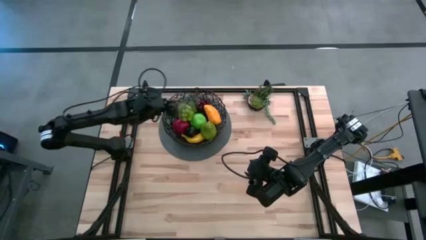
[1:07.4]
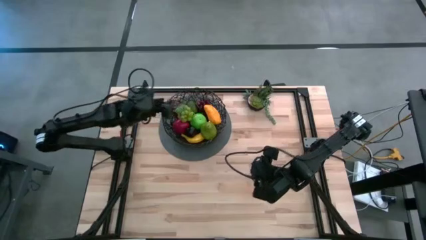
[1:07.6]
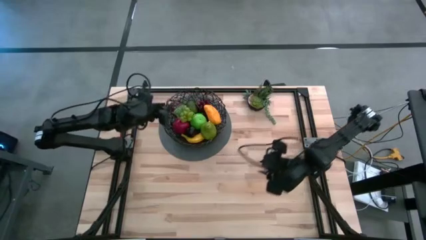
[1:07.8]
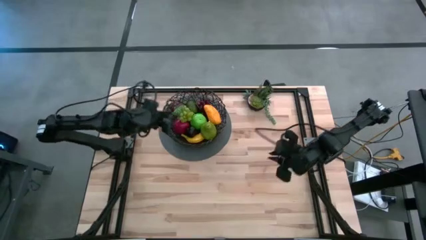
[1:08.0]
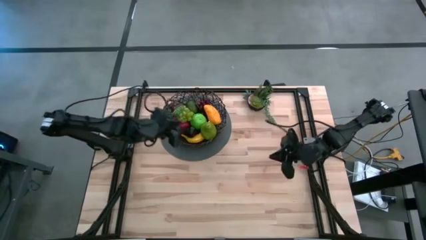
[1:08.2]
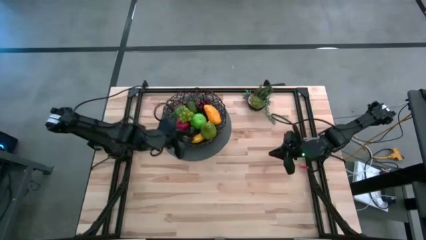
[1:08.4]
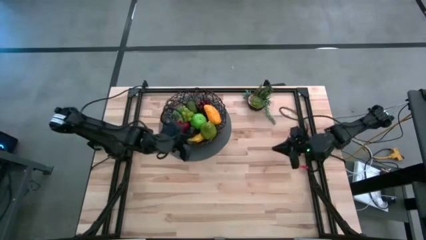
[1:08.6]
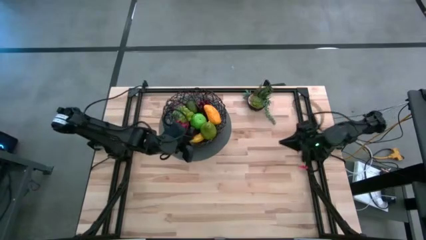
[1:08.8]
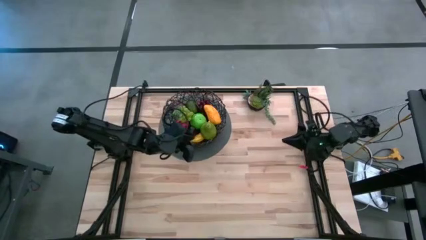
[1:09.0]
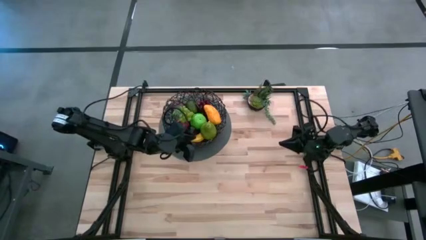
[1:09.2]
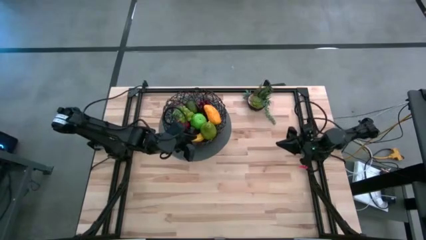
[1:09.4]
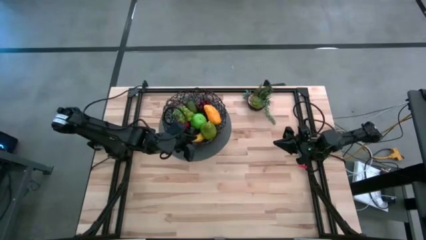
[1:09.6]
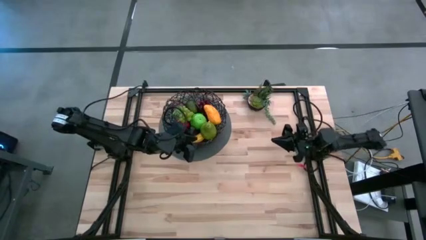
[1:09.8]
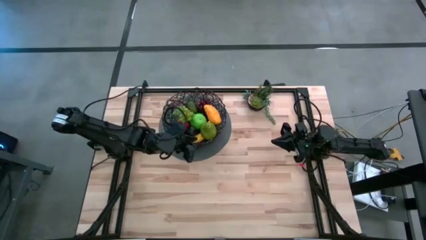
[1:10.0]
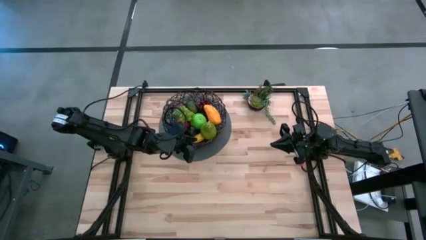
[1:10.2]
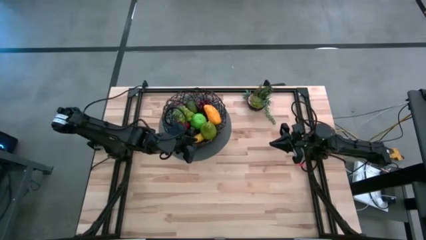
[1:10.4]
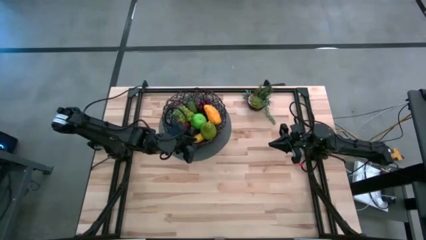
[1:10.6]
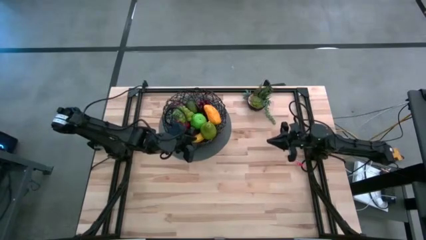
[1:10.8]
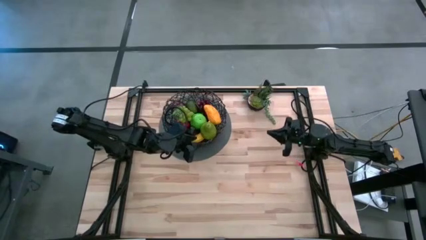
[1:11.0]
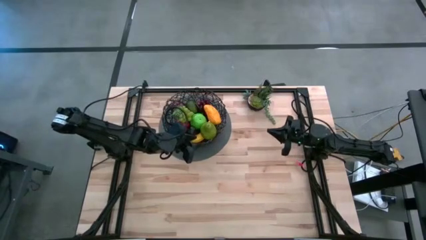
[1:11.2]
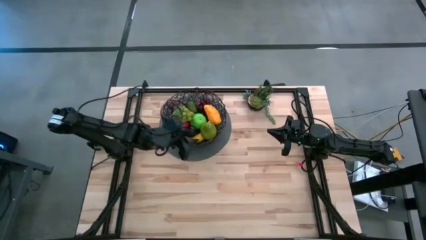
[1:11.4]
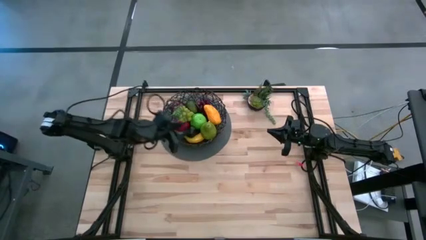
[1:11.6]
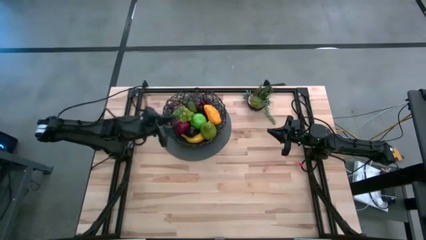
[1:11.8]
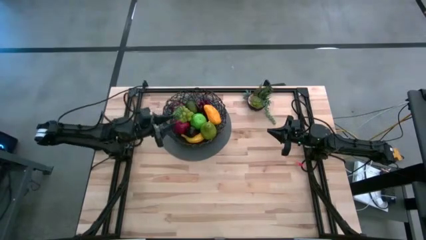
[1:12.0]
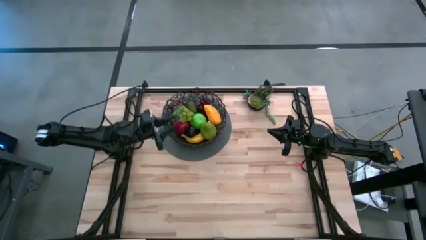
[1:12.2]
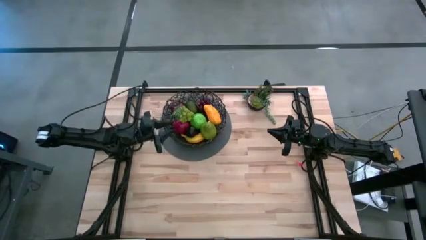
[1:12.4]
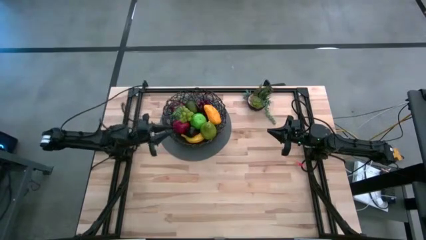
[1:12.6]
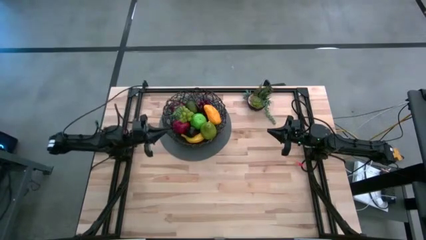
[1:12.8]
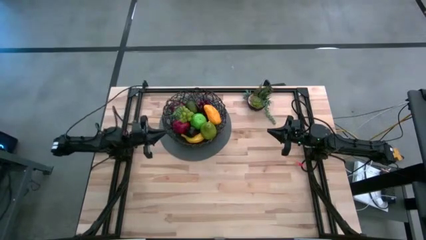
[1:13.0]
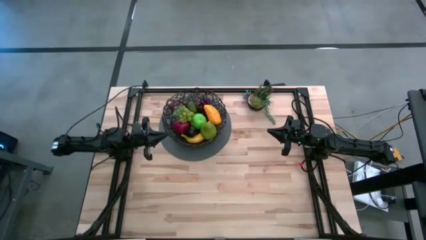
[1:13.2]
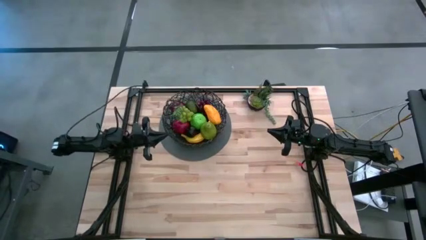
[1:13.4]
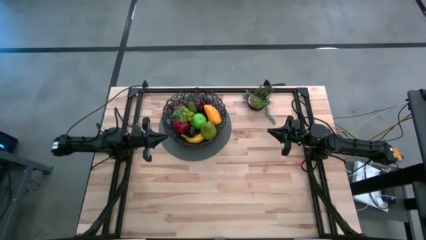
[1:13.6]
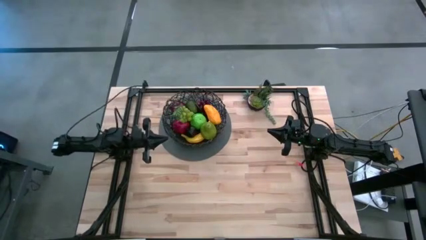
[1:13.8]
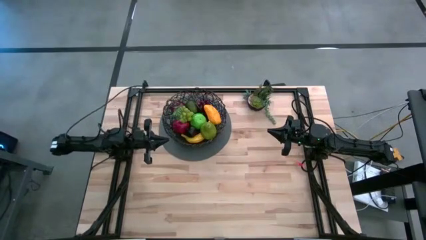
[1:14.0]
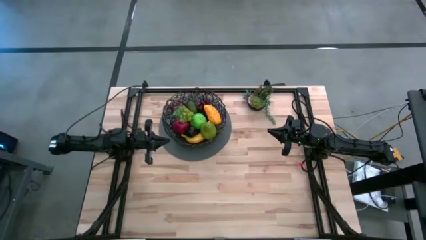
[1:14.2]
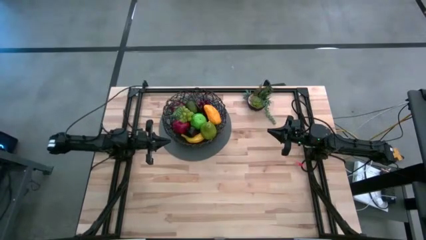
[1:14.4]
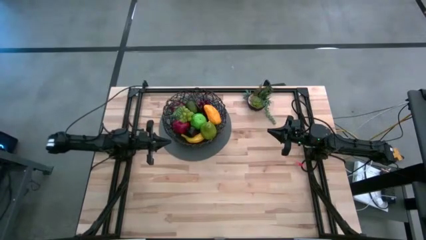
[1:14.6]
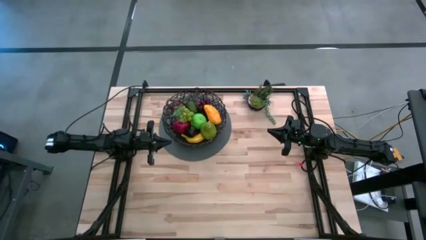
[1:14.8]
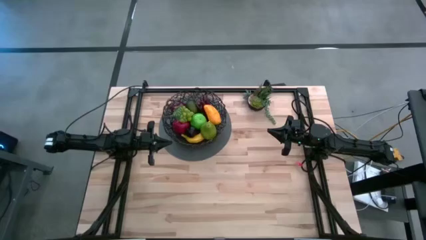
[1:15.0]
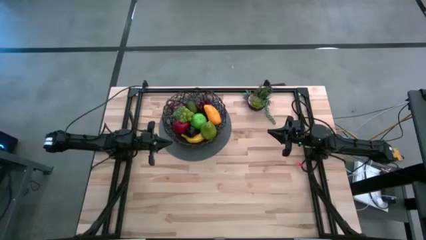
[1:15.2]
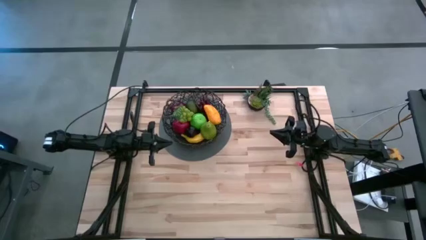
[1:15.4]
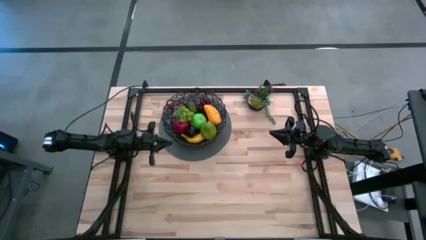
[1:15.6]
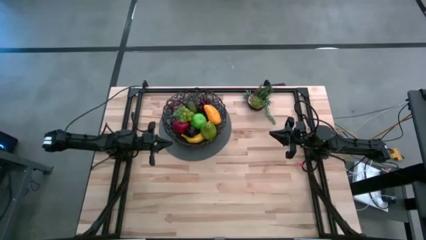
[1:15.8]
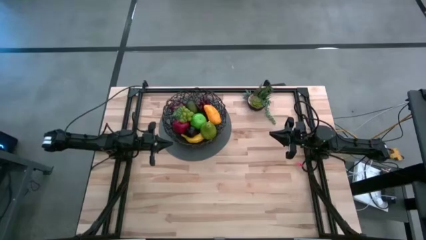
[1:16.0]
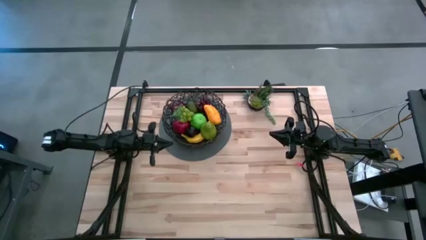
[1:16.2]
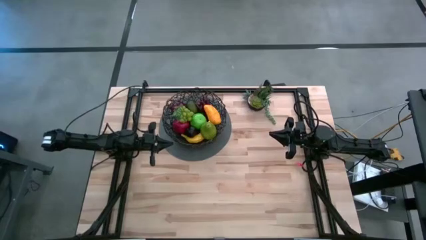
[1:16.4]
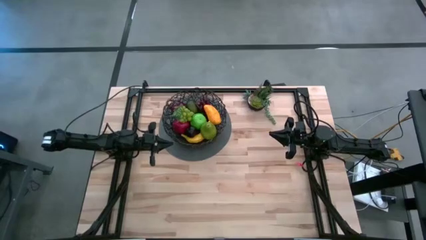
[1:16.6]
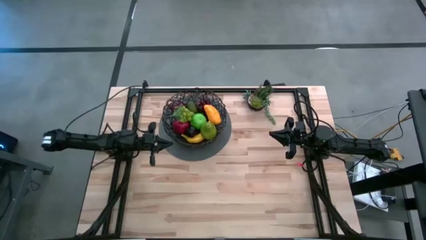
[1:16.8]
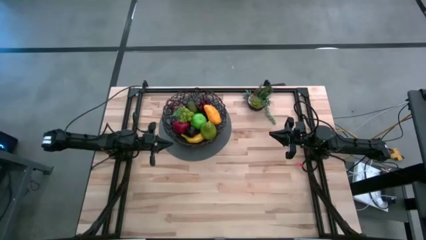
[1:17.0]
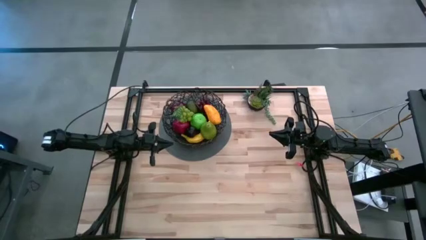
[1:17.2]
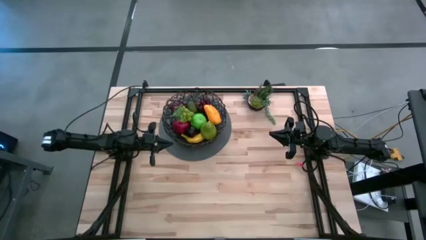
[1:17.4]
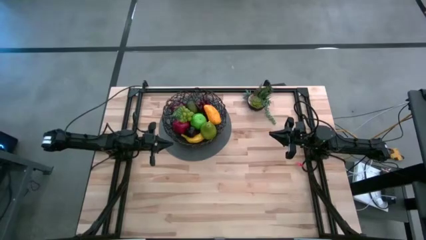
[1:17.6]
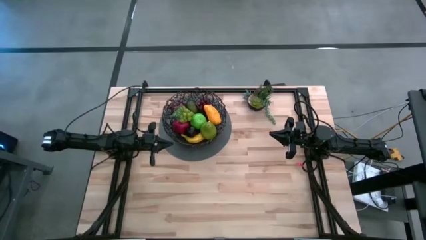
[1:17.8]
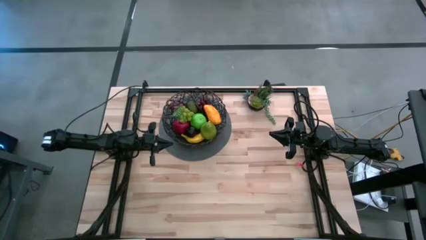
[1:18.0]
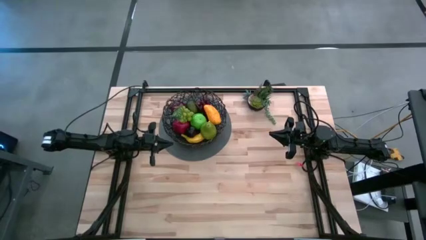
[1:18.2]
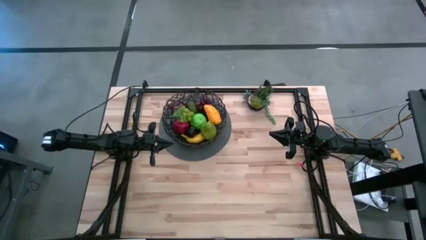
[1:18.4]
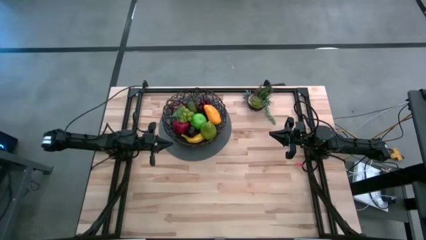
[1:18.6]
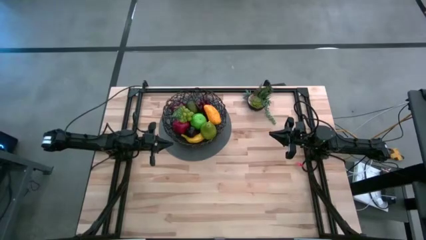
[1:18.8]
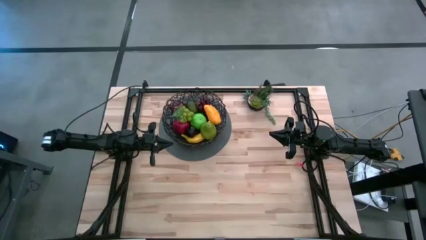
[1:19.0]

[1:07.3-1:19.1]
Task: Build produce basket
Return to Home Position
